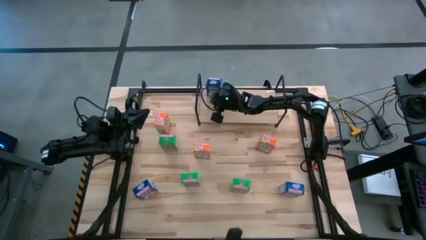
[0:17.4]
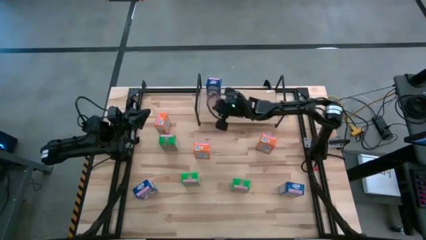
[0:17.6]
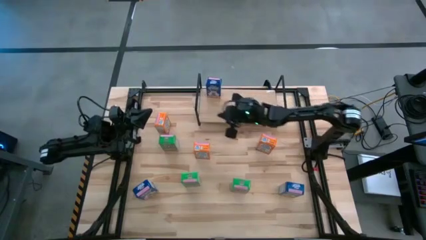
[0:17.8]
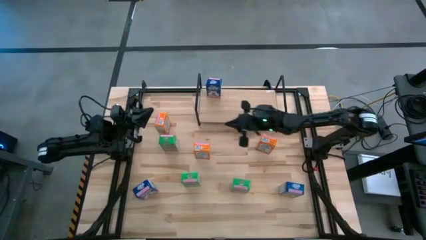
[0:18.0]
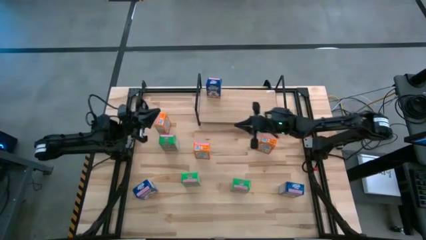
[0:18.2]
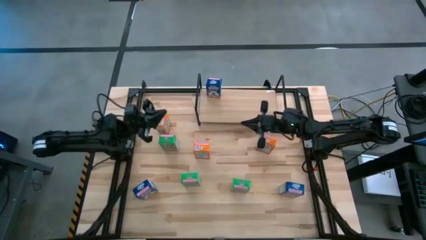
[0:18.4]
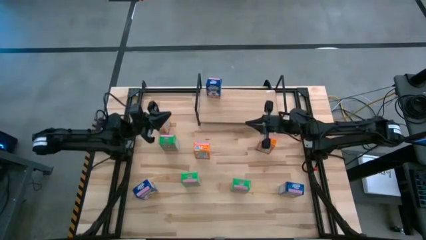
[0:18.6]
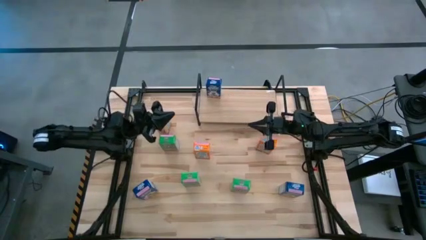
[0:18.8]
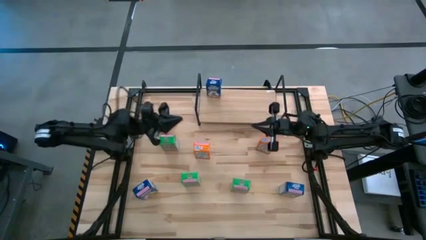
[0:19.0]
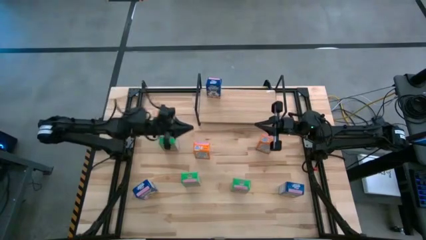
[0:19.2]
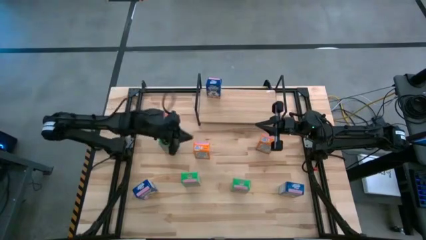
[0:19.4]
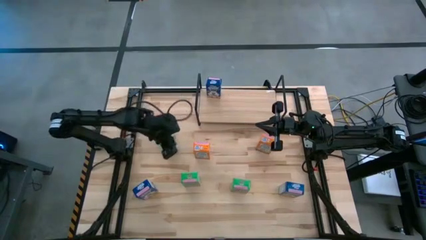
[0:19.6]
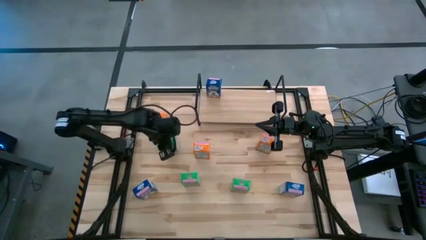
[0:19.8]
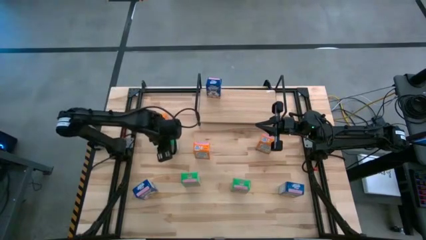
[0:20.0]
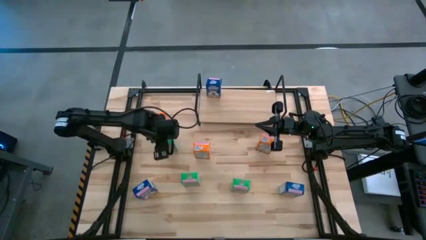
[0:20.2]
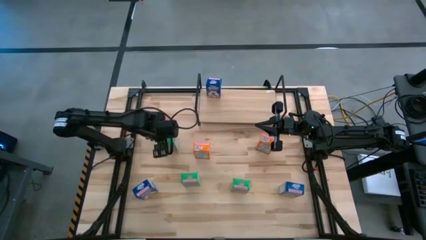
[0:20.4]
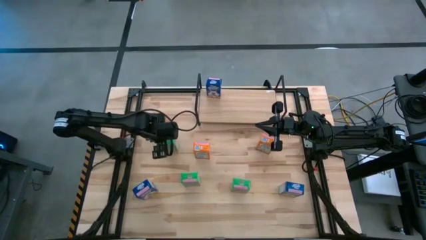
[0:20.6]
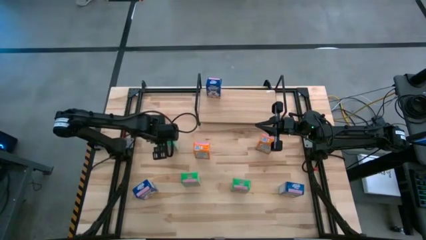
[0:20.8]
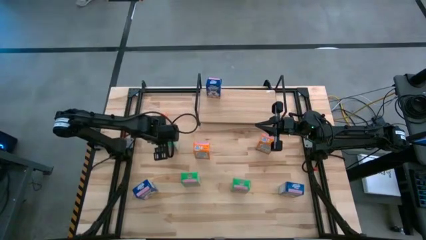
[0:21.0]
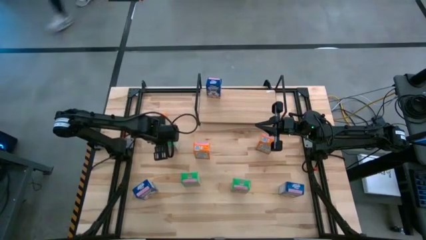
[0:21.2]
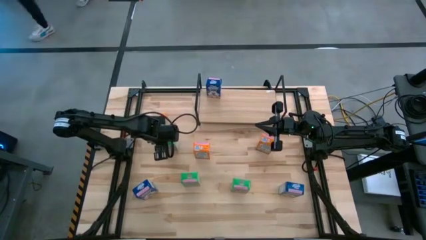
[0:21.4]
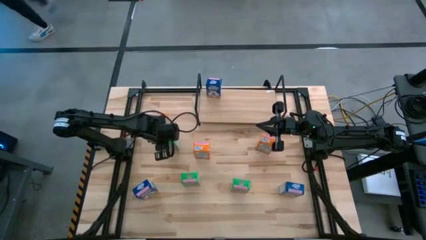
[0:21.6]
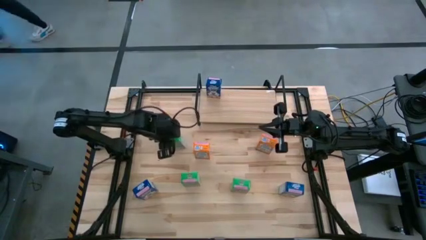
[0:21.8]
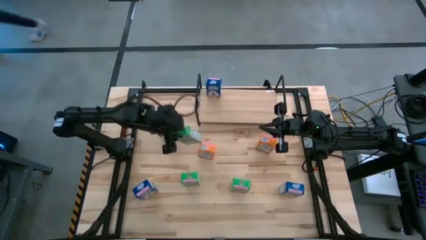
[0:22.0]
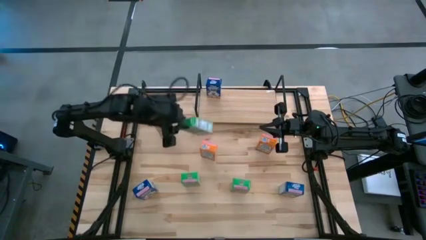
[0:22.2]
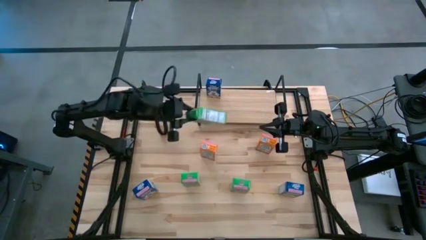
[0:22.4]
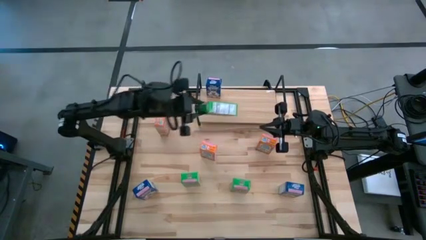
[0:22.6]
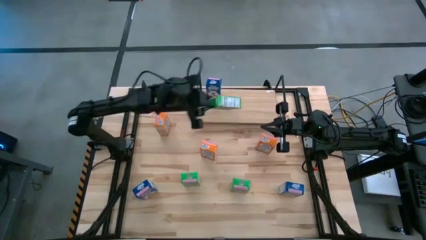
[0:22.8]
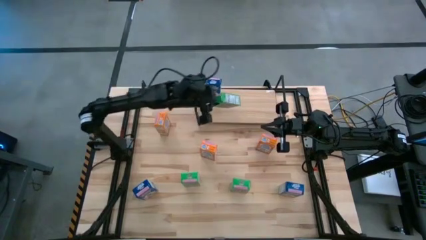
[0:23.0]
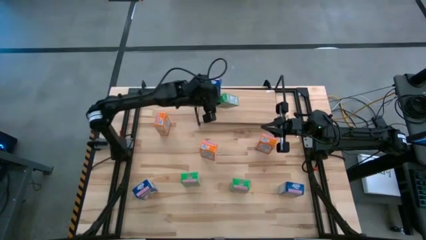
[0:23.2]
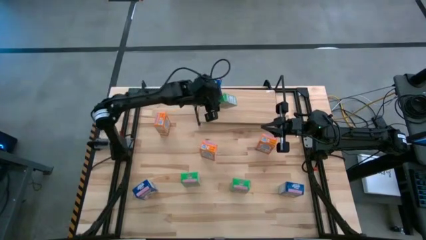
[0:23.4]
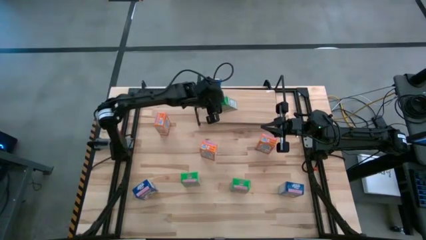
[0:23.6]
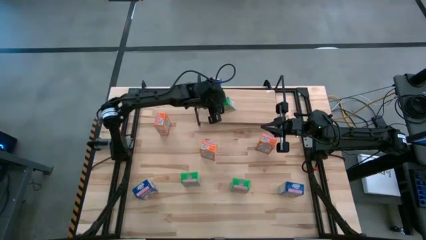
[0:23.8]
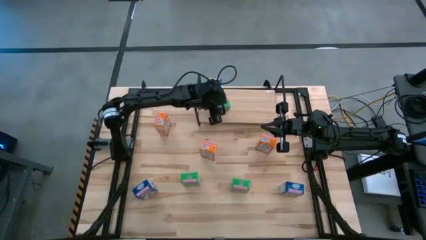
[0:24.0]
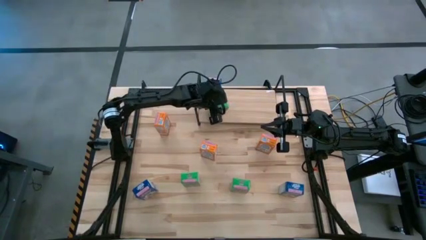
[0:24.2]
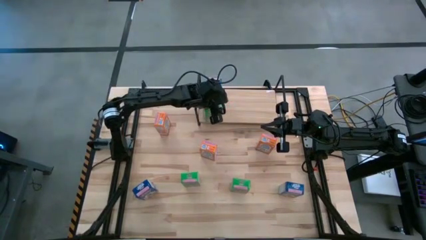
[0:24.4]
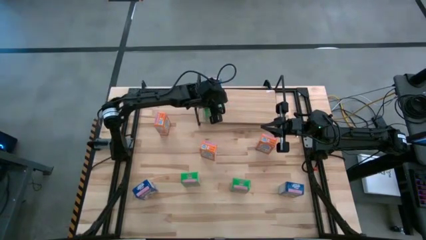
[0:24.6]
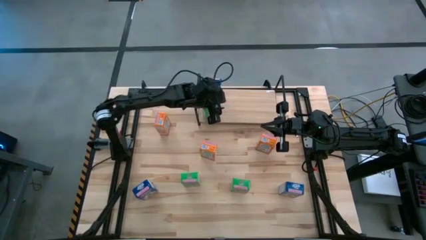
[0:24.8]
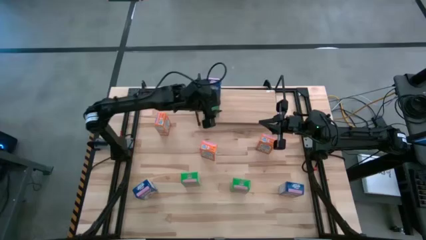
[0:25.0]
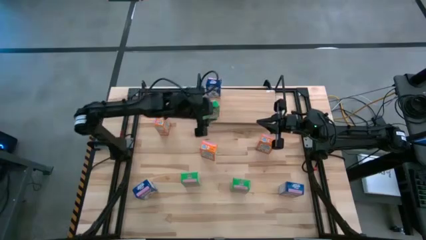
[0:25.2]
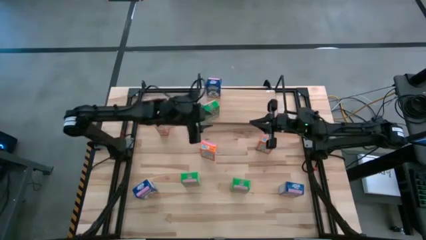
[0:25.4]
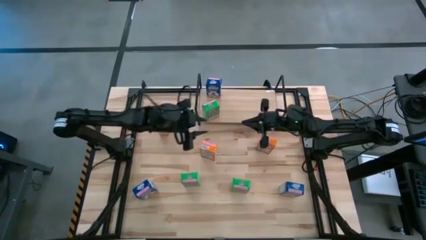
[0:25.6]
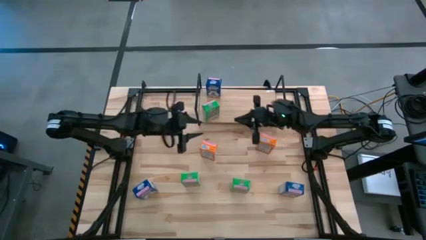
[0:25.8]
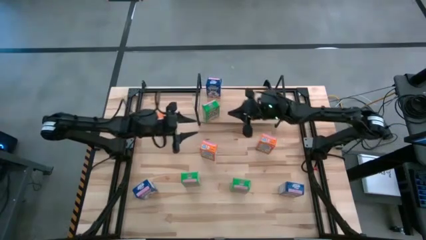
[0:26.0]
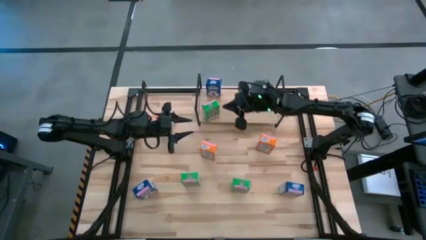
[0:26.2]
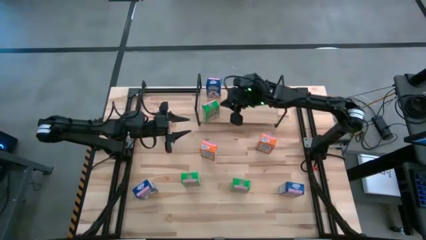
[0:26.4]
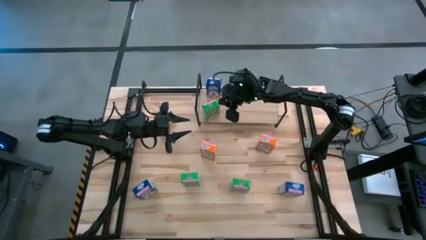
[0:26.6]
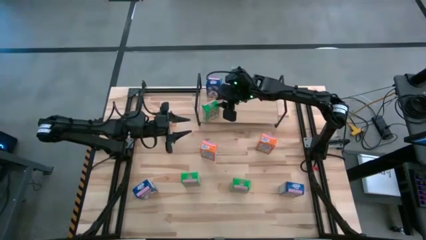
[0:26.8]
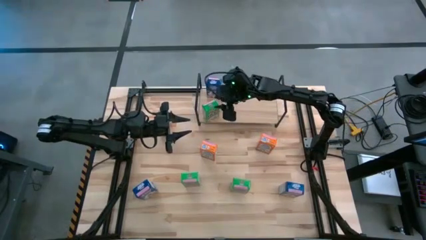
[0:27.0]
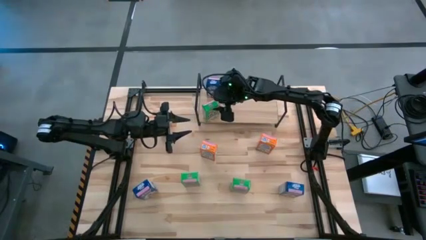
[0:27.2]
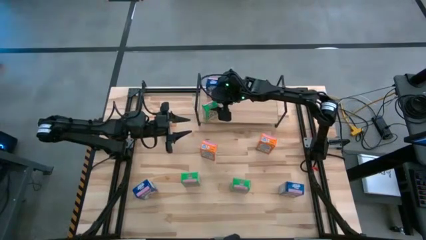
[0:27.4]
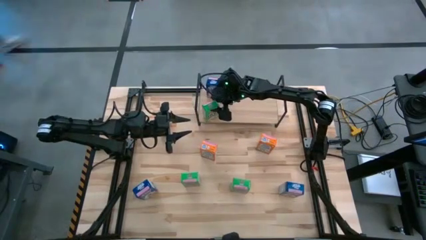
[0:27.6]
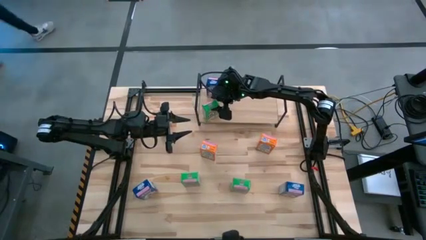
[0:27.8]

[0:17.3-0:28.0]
Task: Stack cereal on shelf
Put the top green cereal box on the shelf

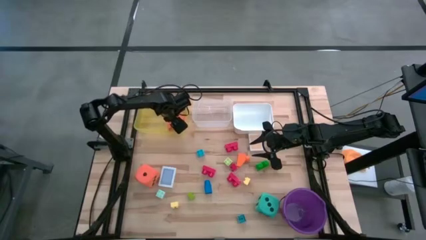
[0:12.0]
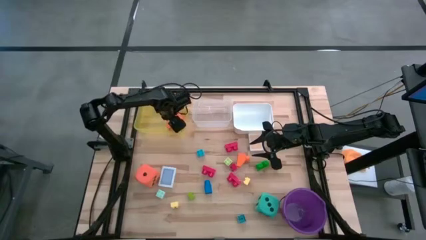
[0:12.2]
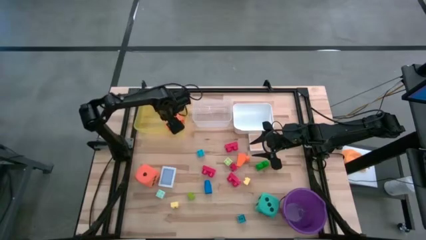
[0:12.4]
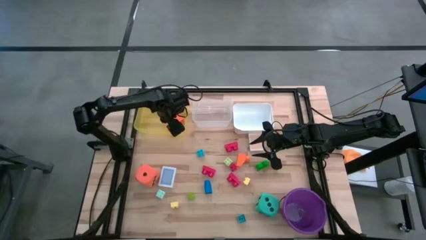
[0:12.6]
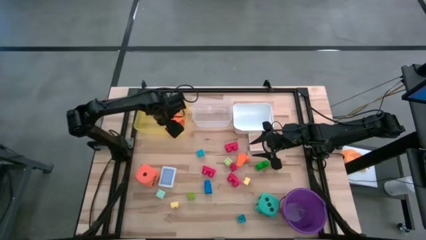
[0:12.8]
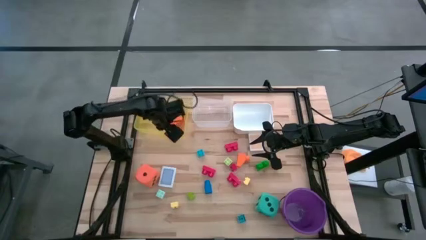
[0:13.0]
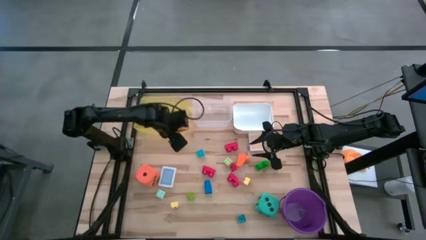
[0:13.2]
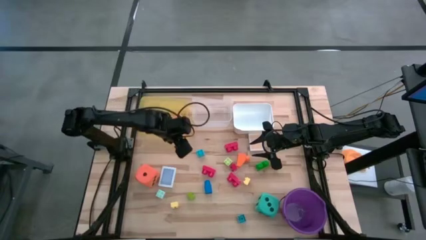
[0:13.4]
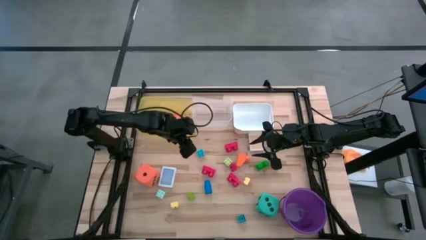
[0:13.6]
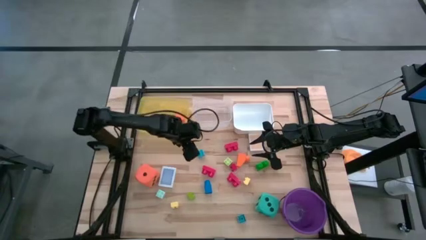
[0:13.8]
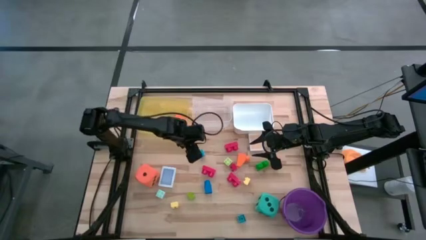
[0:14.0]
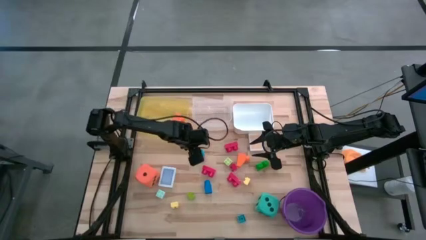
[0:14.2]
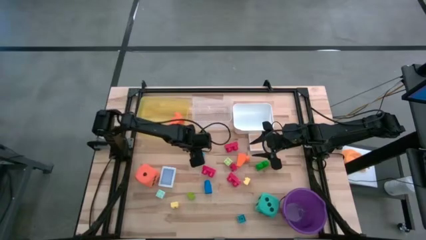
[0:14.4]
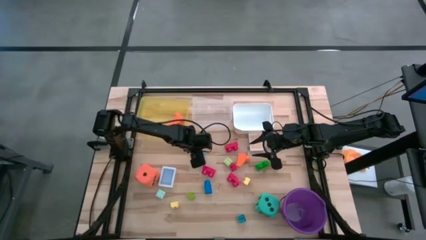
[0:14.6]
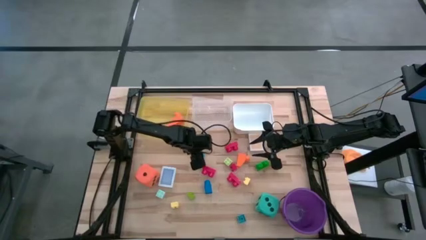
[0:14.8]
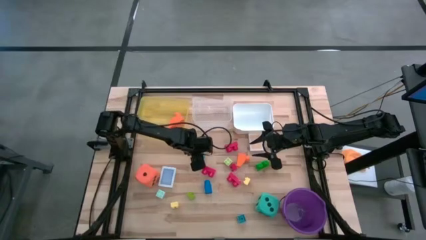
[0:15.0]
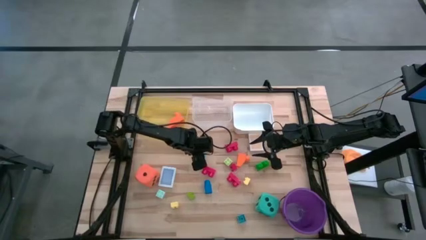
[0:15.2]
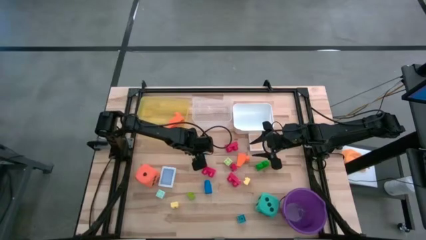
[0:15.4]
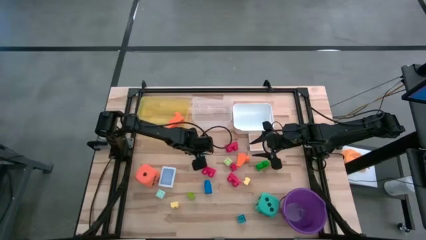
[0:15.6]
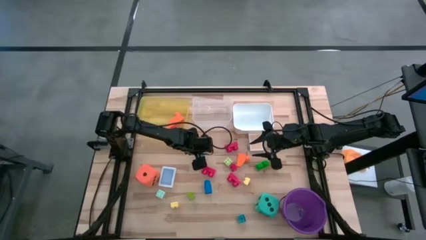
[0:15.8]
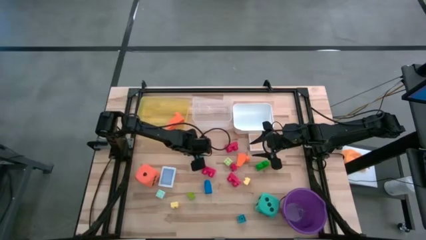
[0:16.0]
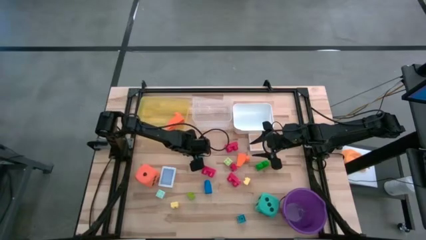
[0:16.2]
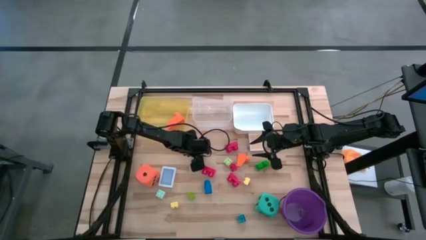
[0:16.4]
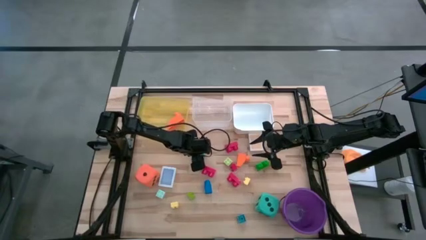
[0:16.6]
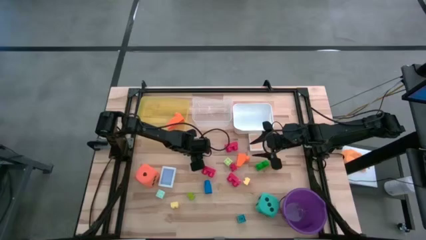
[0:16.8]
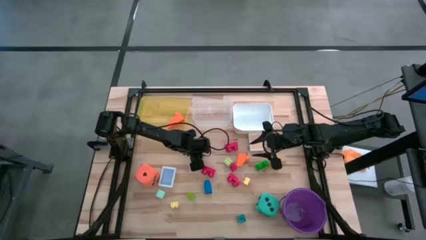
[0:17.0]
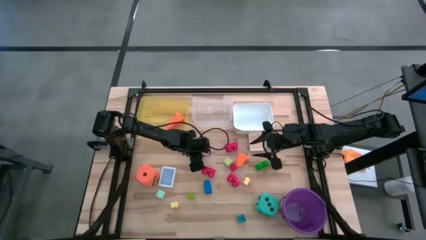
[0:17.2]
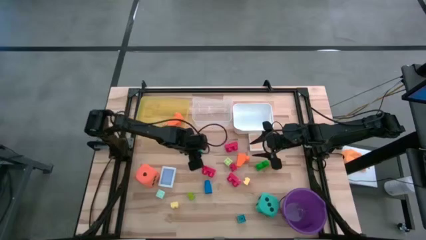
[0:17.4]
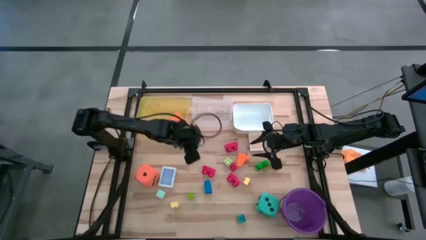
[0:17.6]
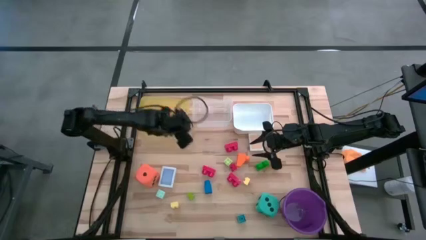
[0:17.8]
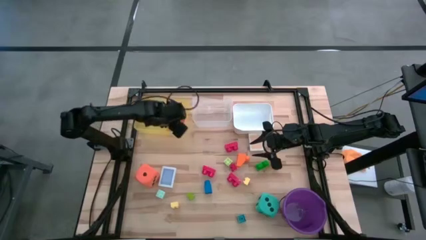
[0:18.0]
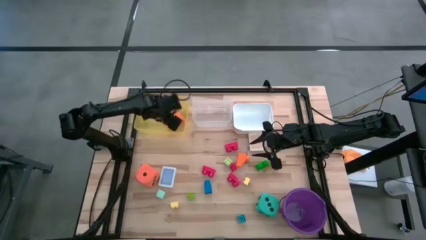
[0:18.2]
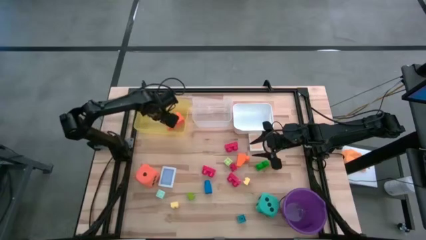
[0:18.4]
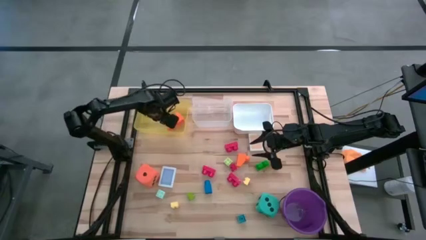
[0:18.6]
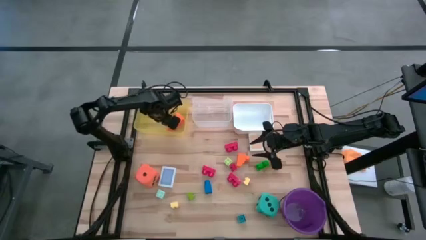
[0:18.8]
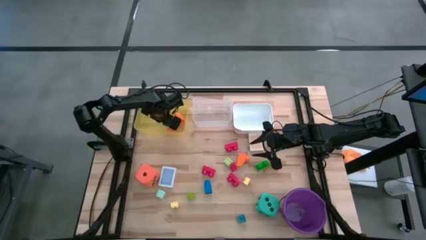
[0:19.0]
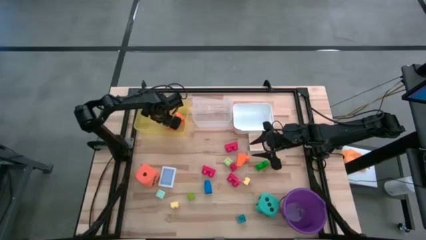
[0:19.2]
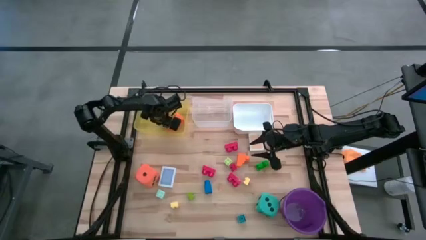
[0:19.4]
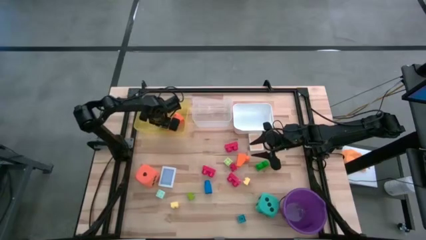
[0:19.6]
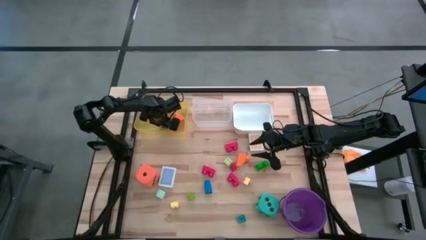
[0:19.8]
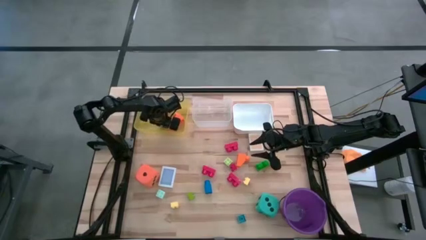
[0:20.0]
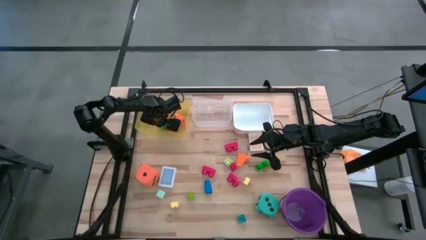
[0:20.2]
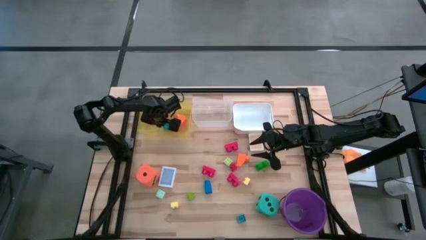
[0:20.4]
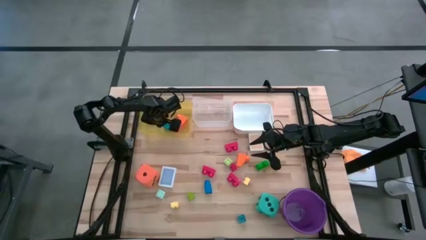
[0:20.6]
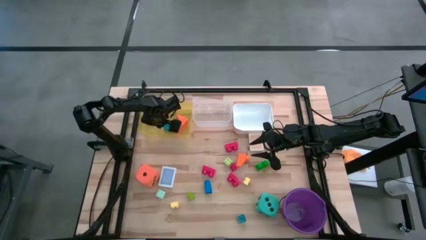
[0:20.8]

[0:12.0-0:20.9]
Task: Pick & Place Toys
Put the blue game piece into the yellow bin
